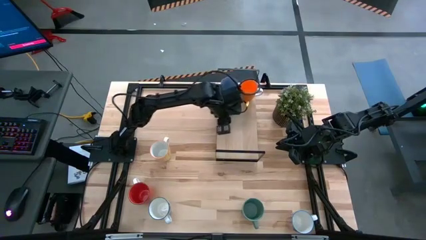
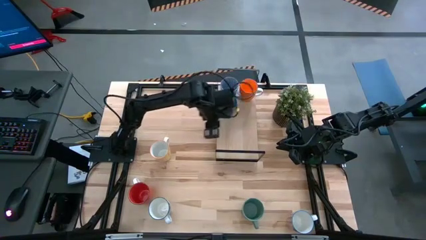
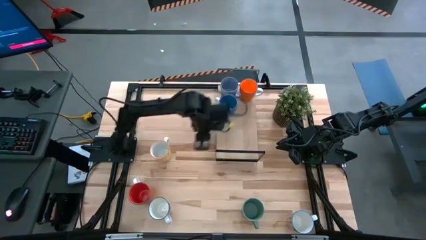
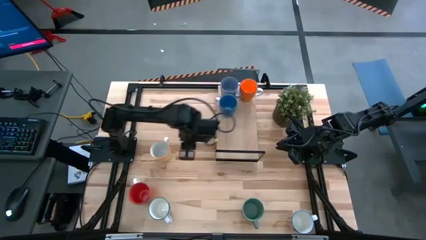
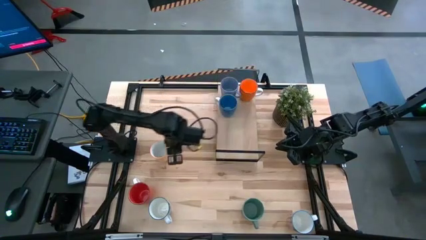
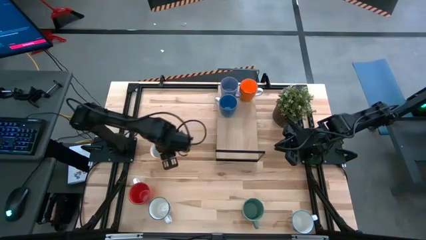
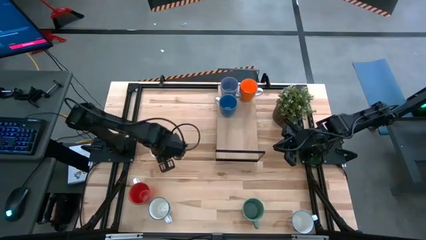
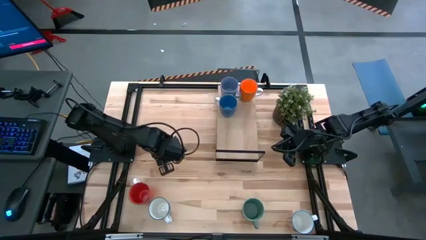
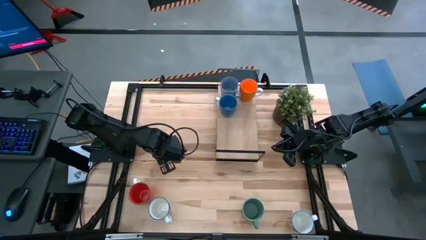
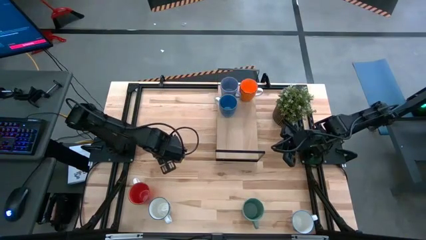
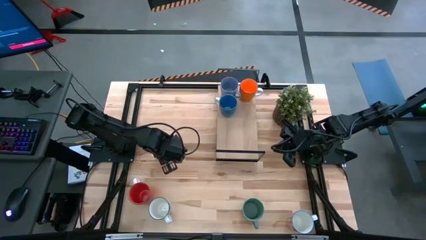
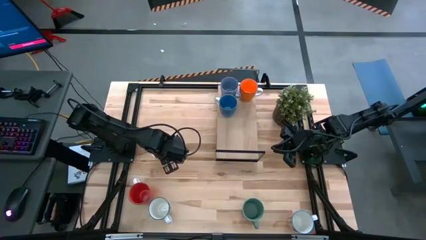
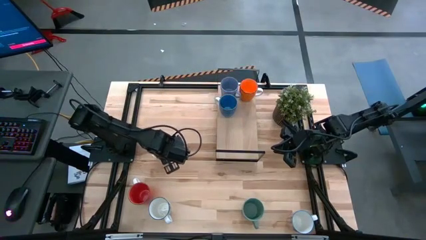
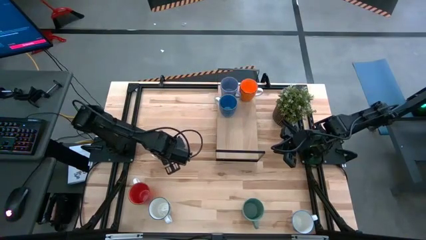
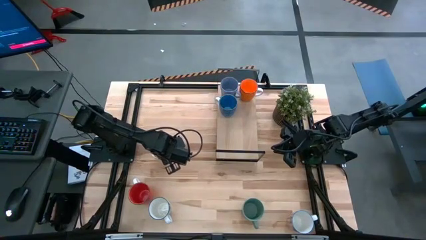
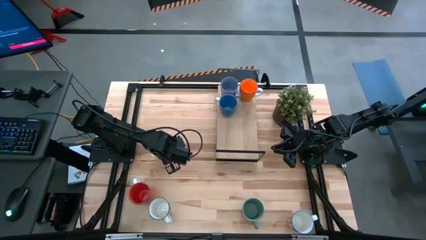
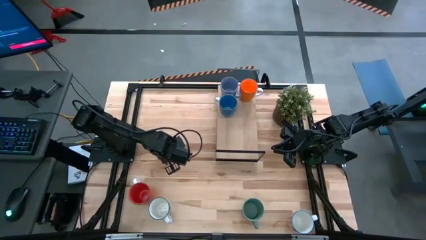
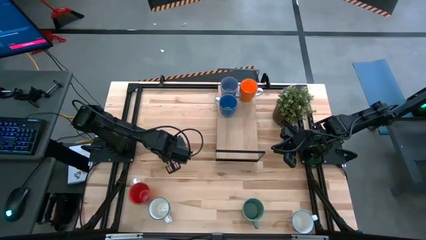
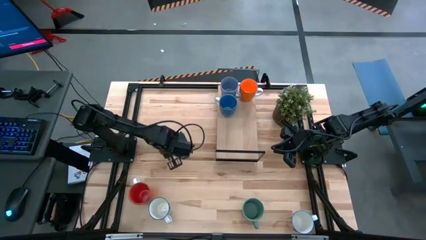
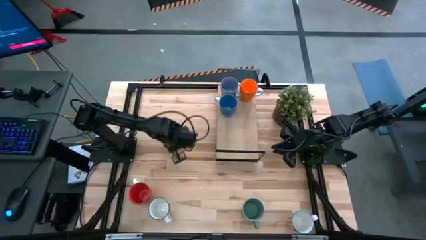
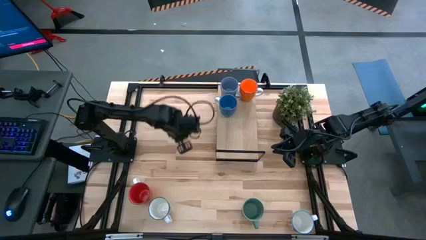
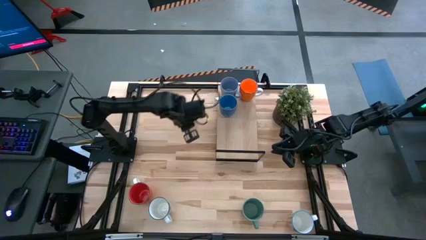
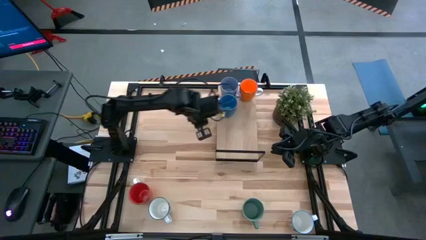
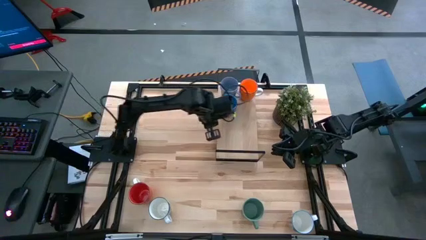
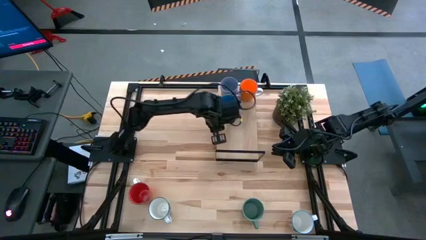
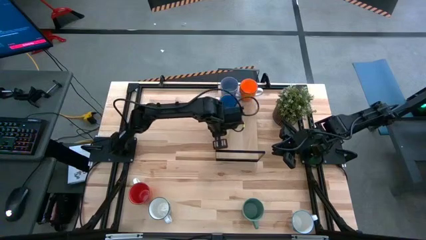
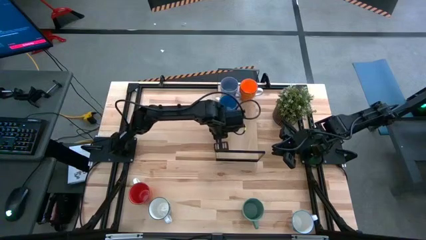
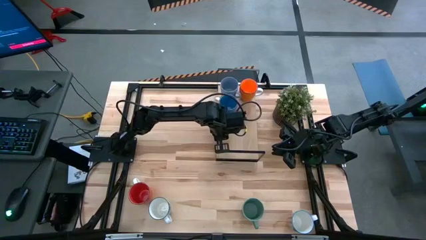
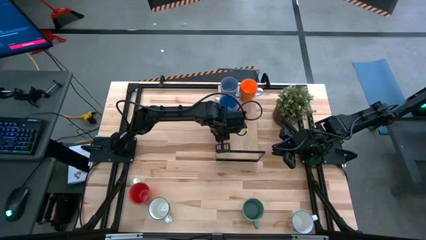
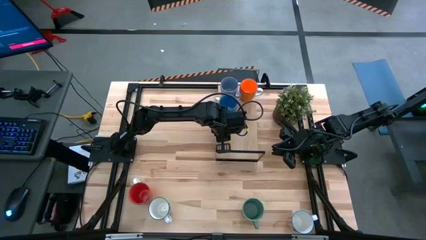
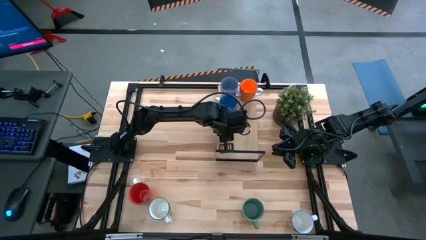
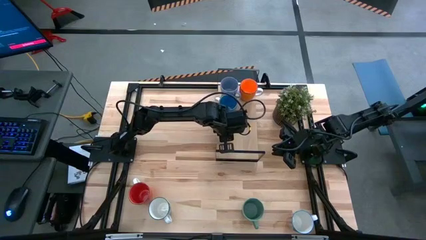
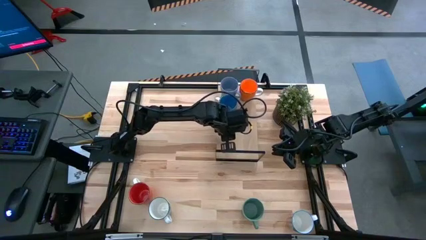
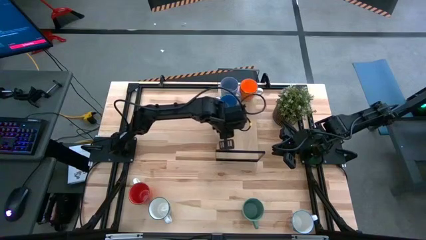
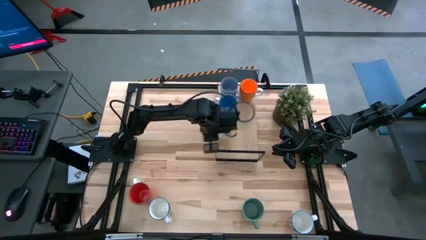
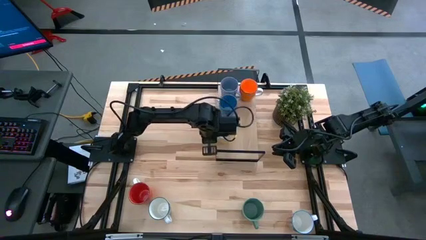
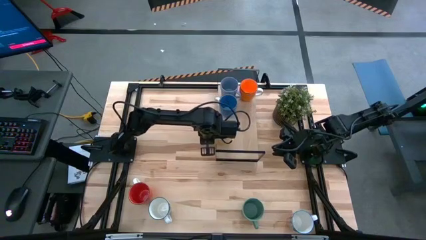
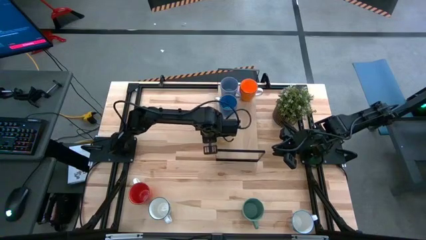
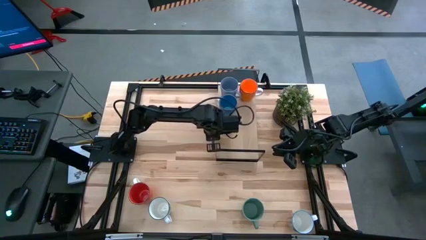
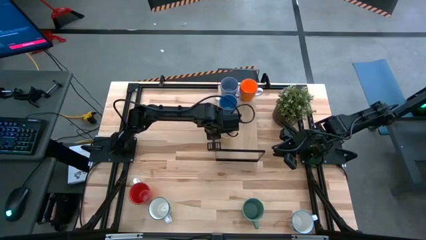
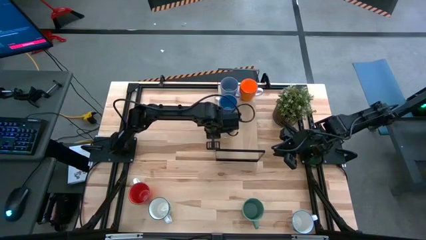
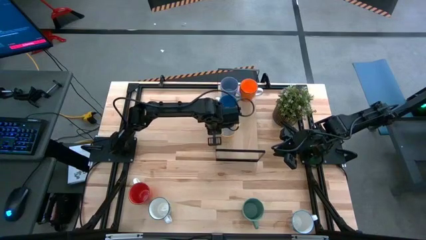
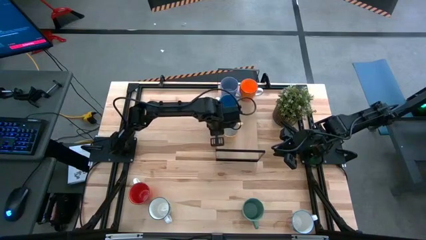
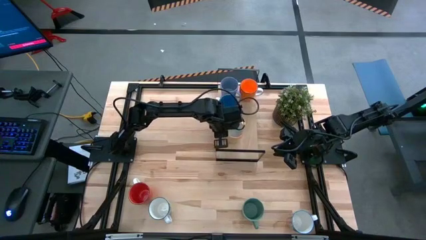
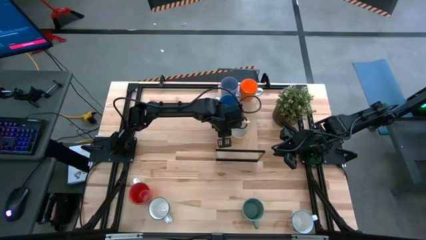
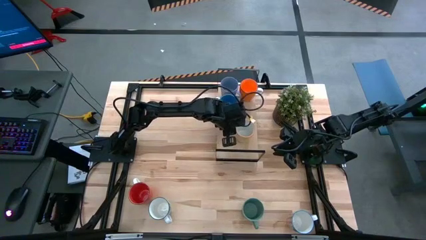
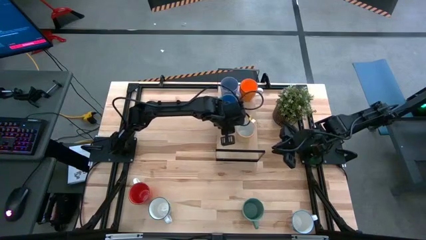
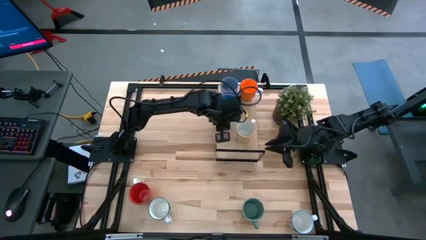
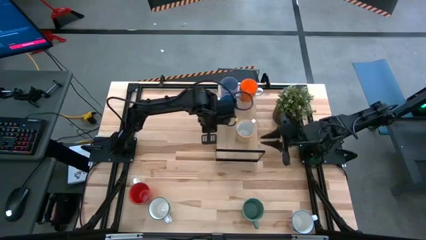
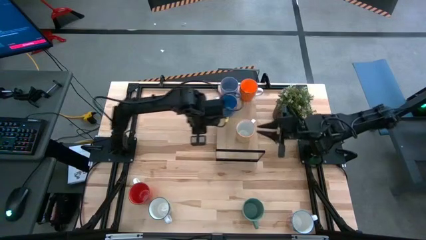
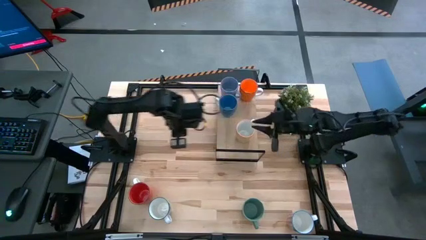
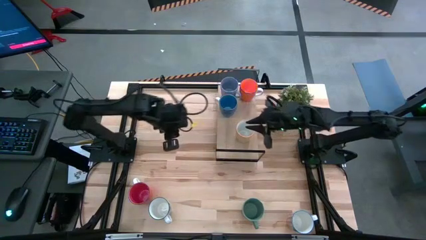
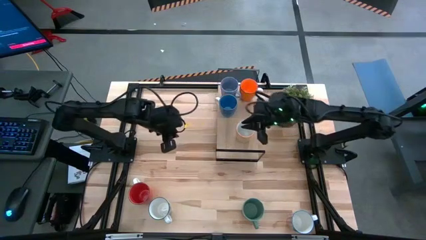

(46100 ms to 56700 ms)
Task: Place coffee mugs
Put the yellow mug on the shelf, next to the orange mug

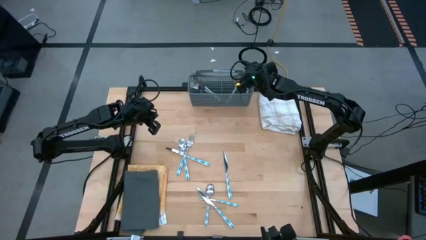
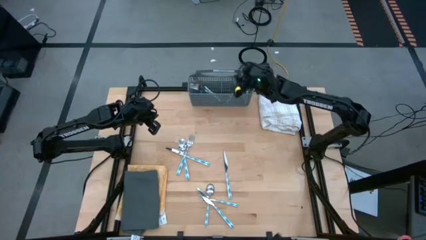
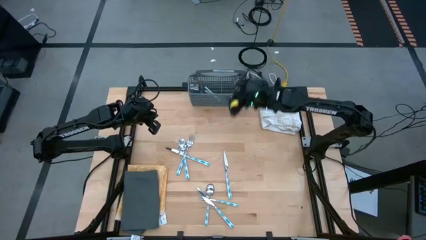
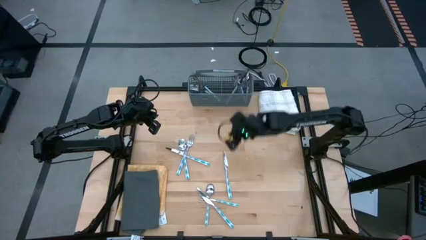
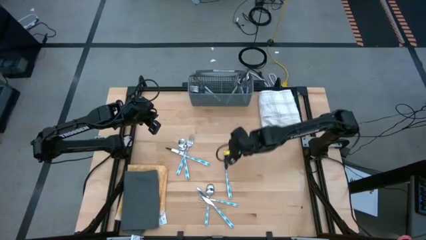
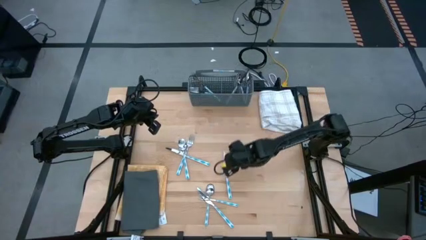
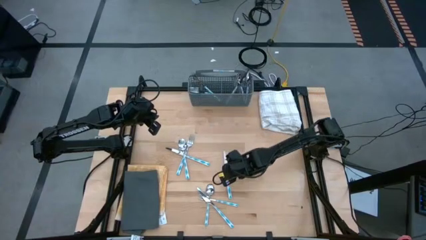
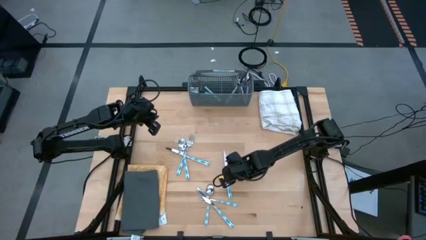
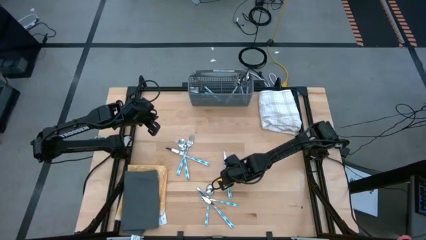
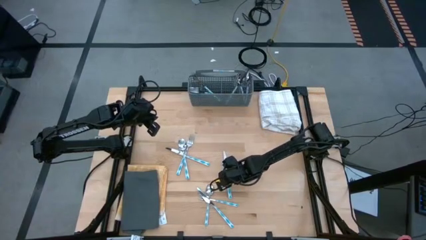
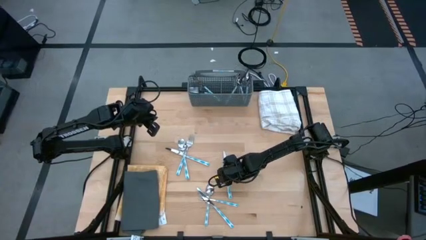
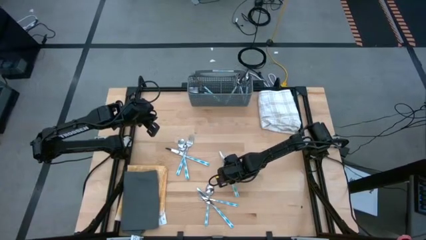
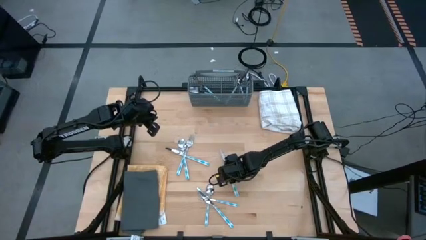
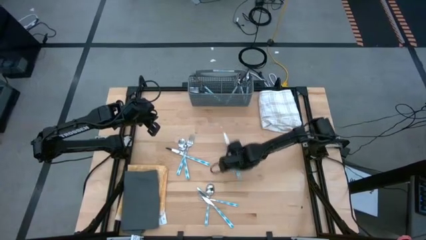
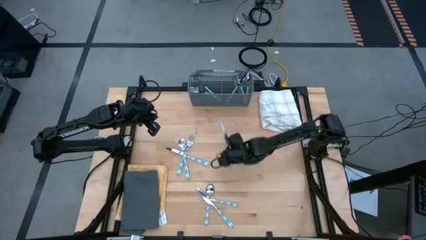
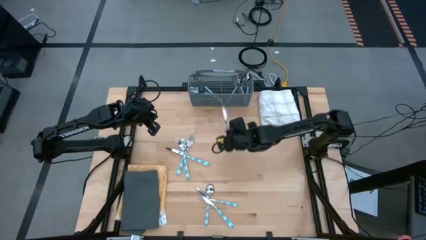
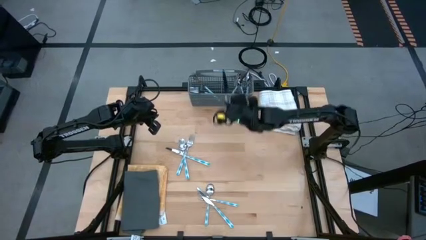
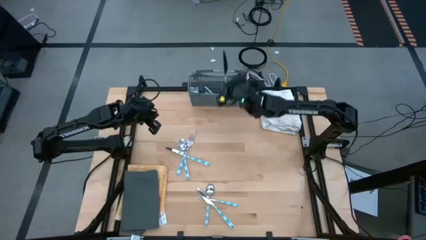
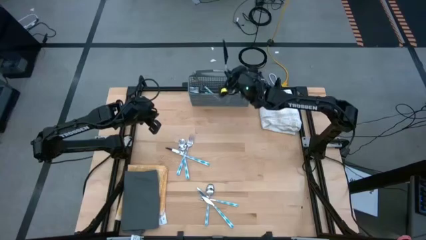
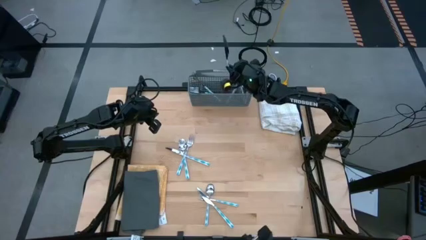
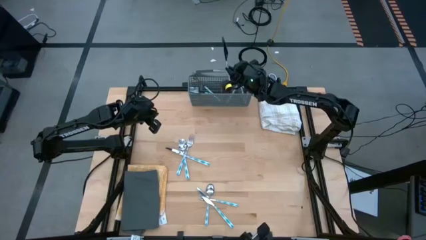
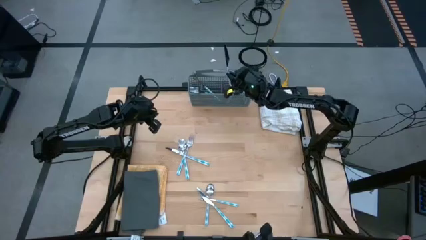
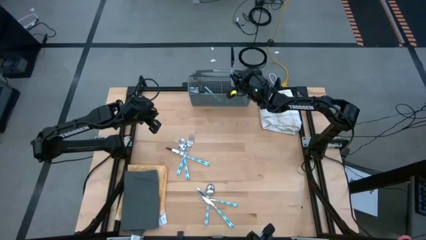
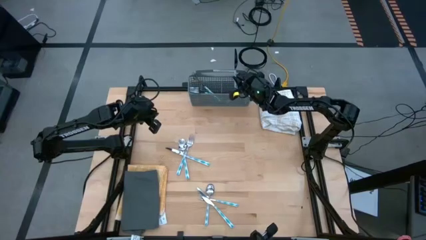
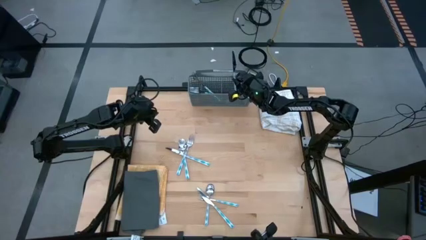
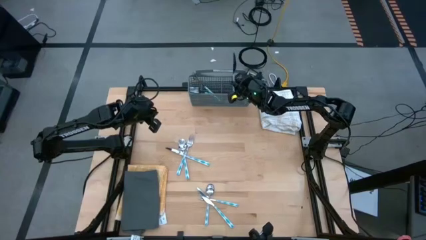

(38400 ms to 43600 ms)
Task: Sort silverware
Put the top right blue table knife into the gray silverware rack
